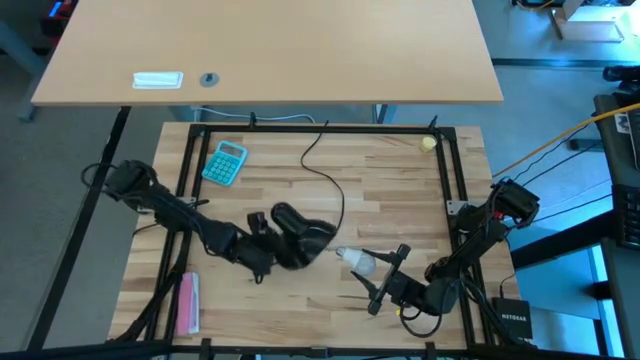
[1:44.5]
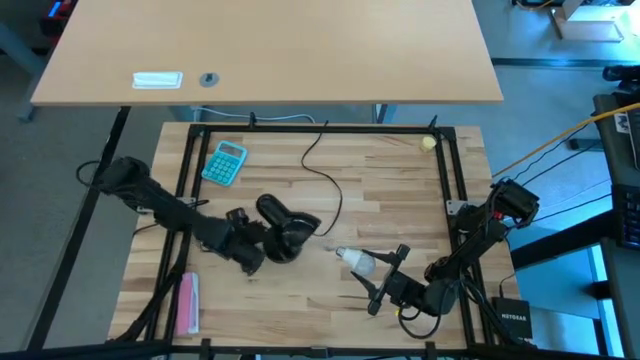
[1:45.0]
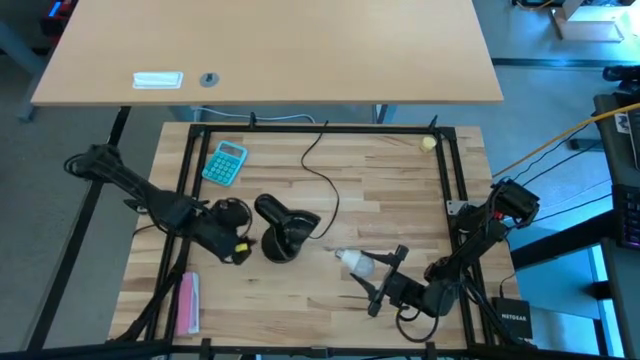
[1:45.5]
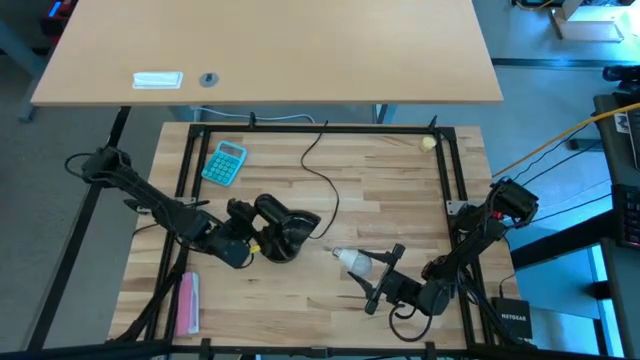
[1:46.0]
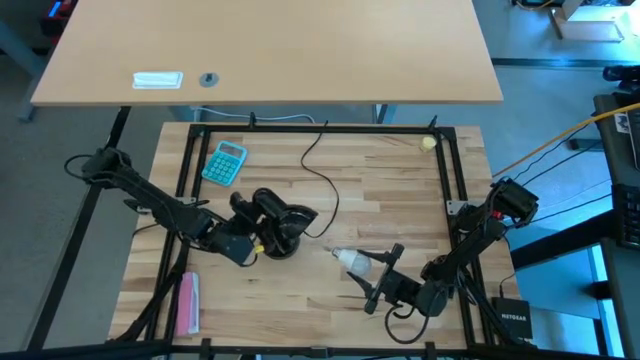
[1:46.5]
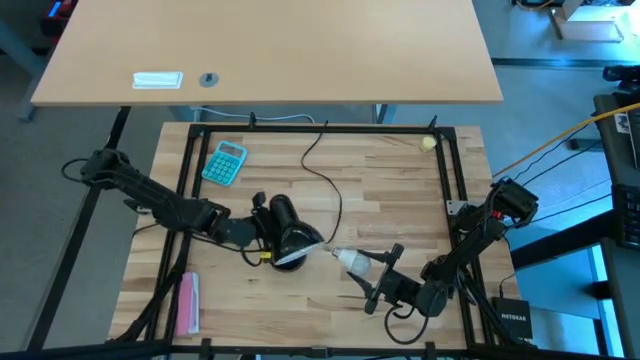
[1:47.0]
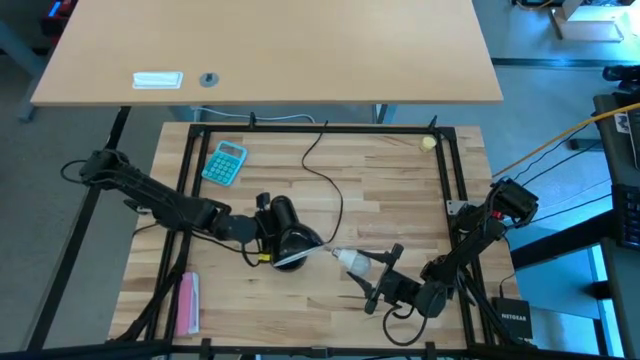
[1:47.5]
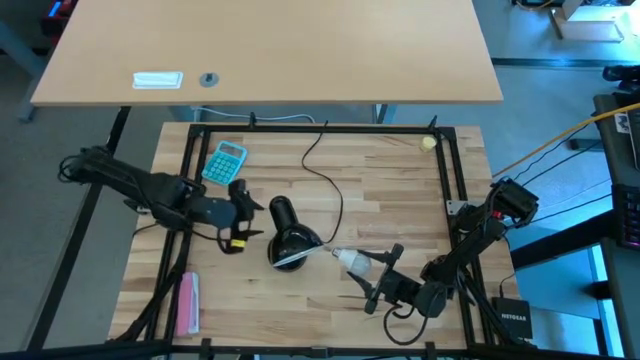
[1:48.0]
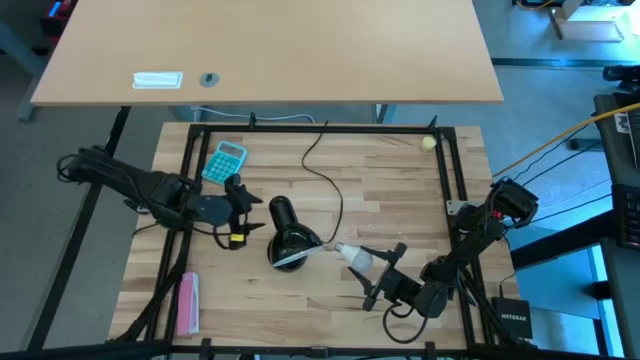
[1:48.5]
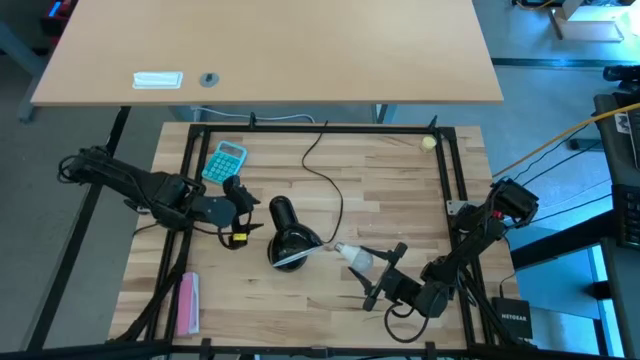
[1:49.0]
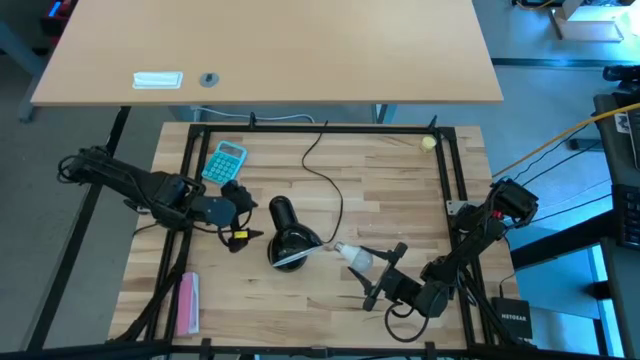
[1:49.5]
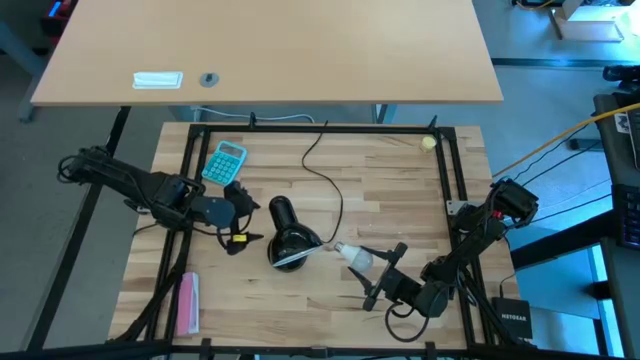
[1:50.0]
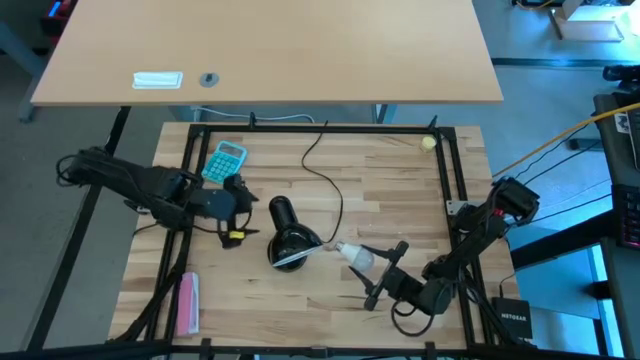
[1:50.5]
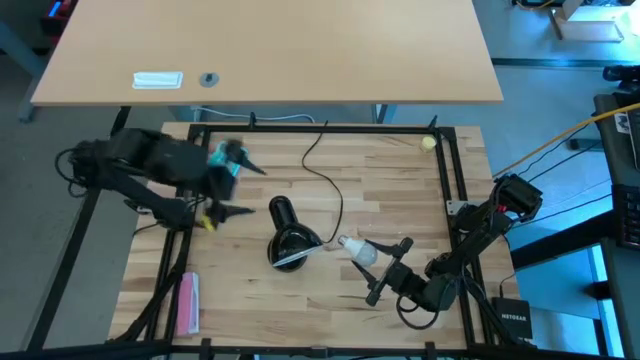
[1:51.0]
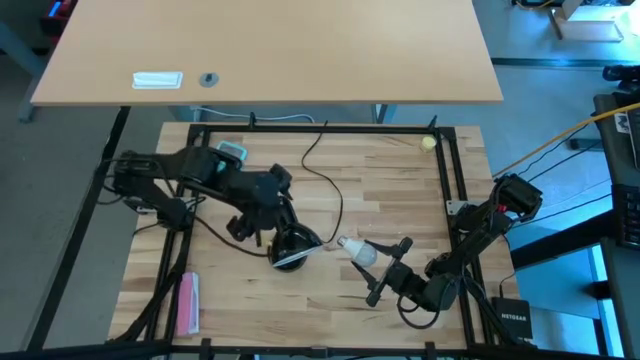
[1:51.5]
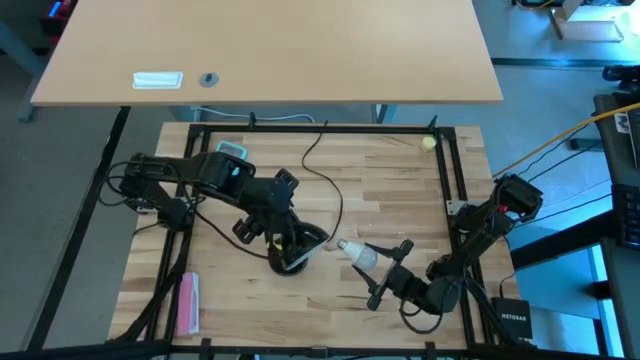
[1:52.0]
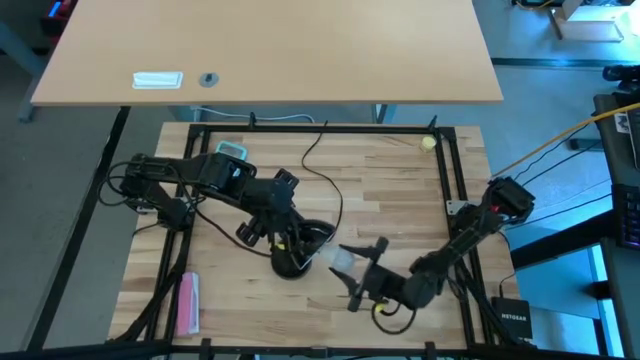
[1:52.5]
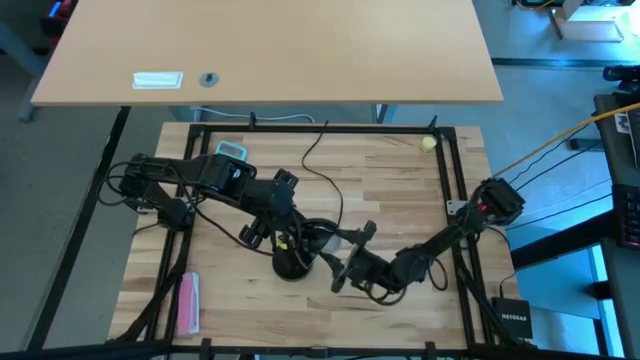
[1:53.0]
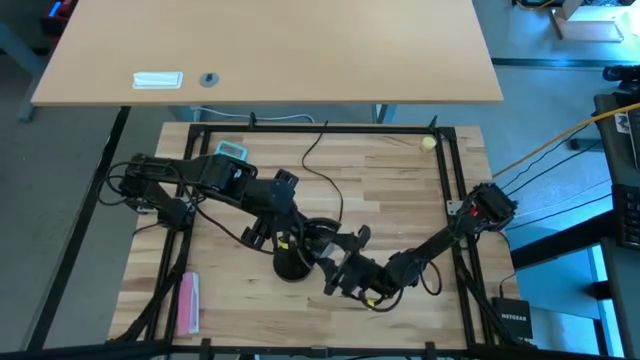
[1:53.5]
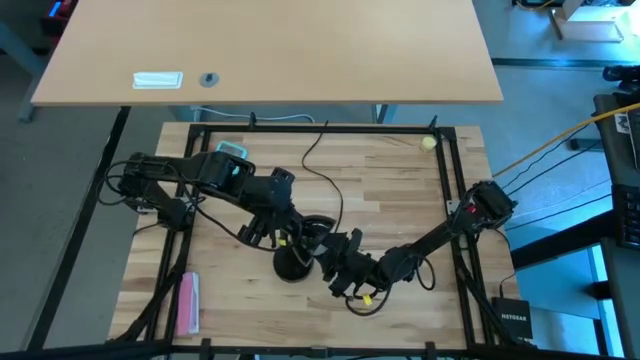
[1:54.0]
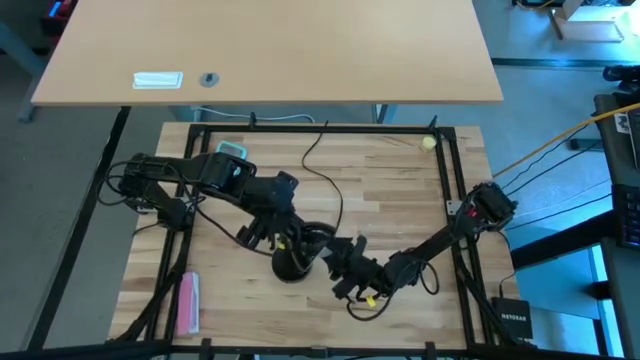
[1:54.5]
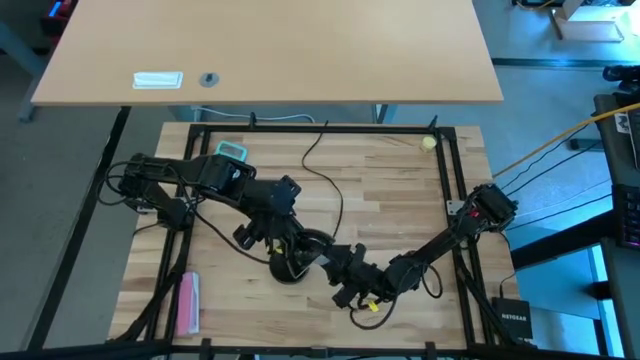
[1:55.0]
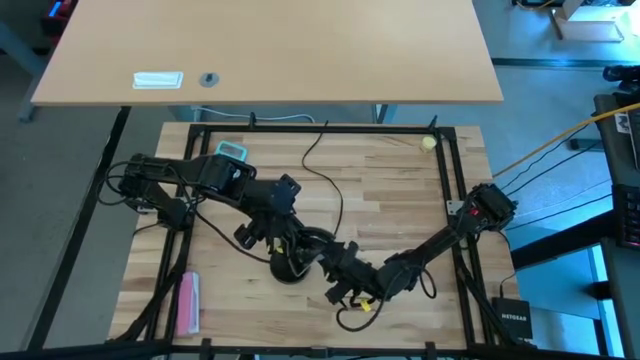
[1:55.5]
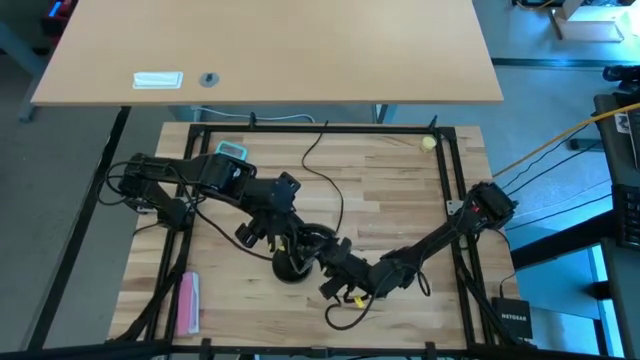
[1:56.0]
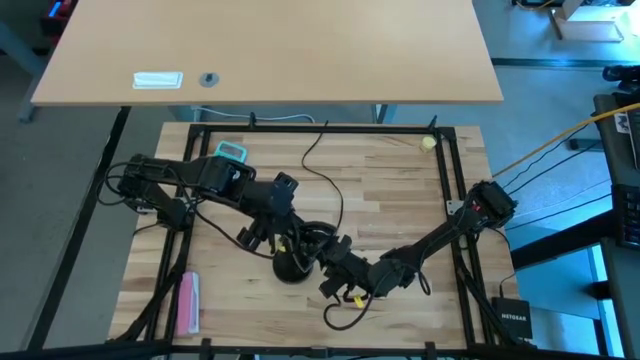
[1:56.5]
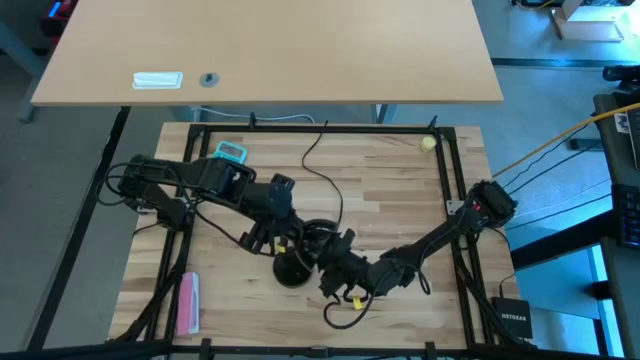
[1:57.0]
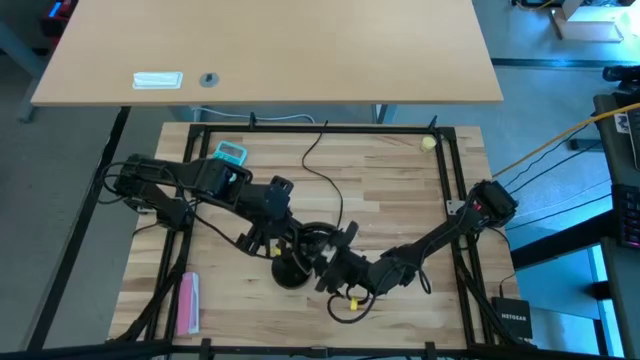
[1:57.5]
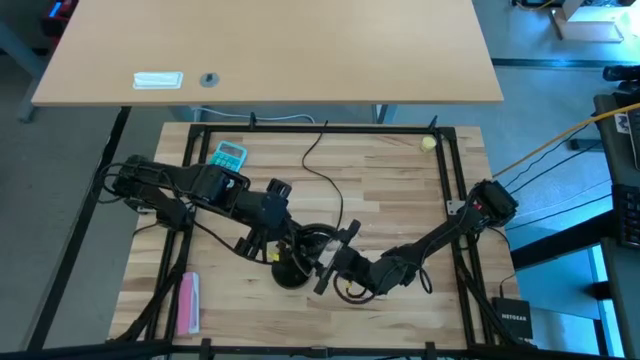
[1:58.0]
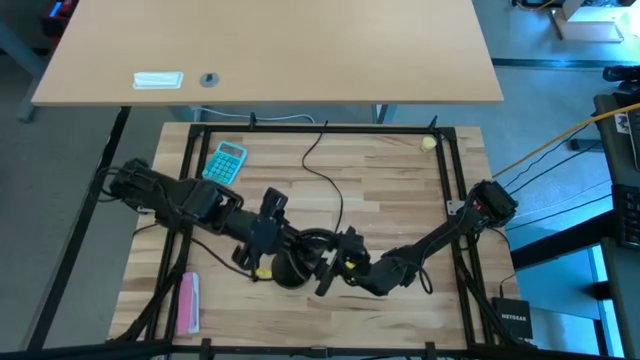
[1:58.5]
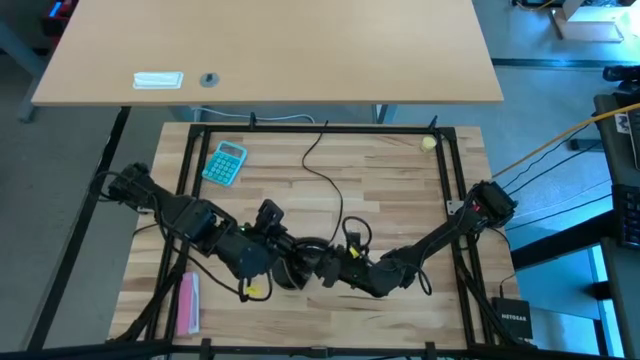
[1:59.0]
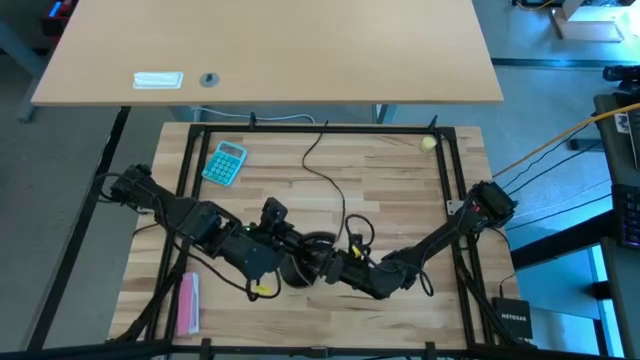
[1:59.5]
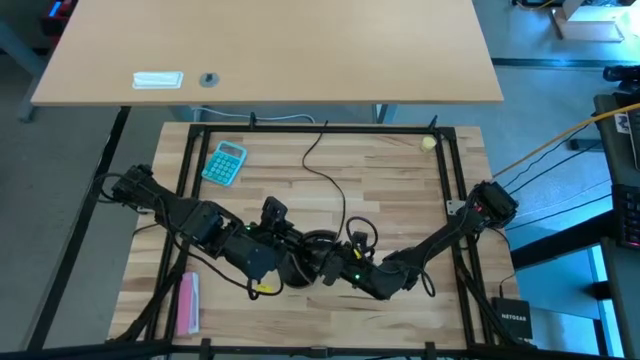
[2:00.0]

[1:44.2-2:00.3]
Task: Screw lightbulb
Insert the lightbulb into the black lamp

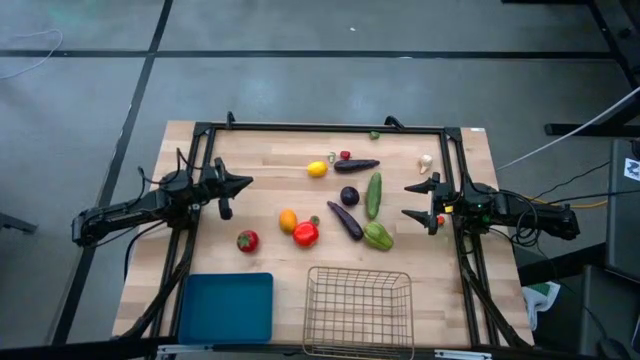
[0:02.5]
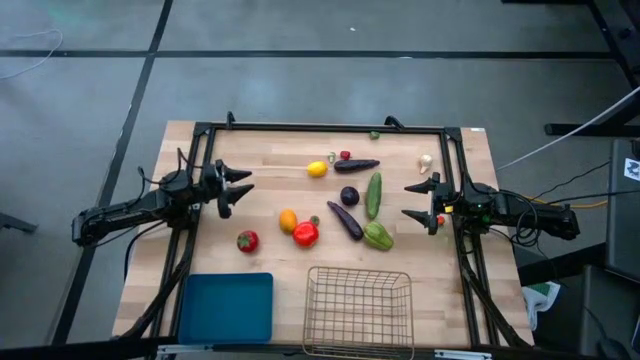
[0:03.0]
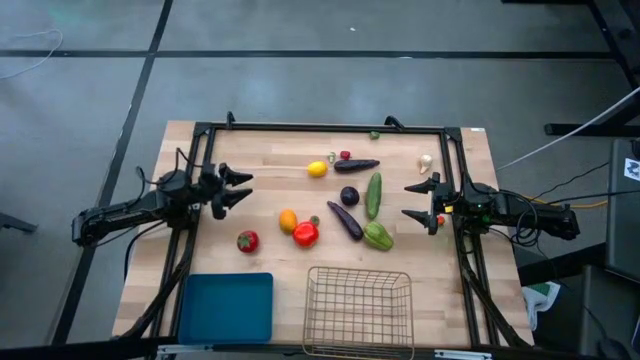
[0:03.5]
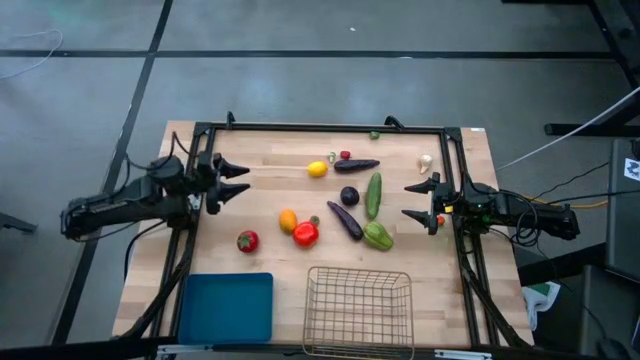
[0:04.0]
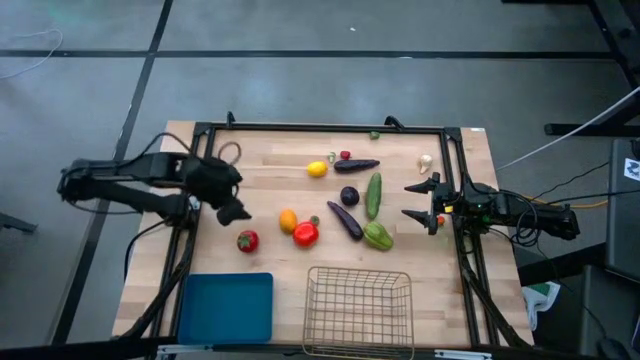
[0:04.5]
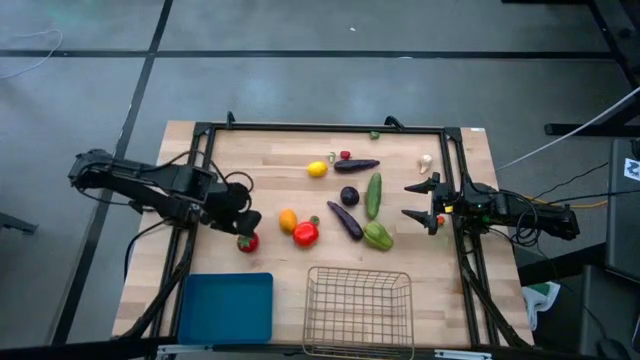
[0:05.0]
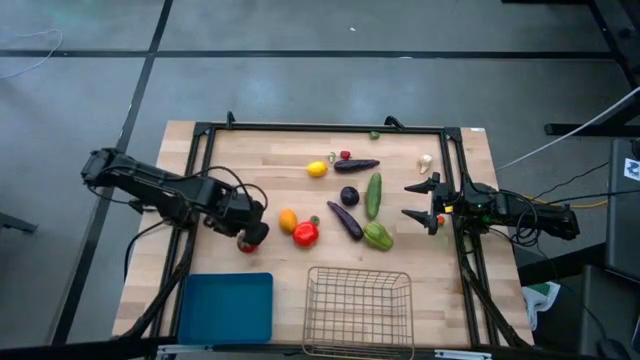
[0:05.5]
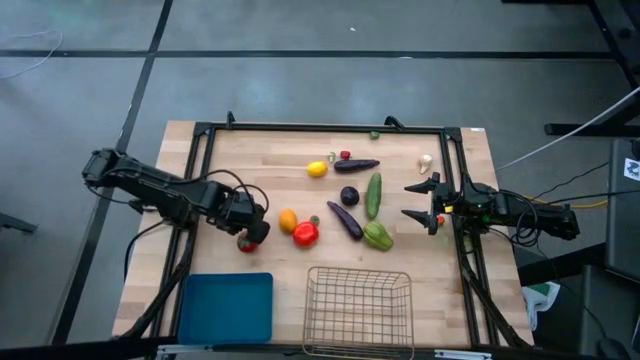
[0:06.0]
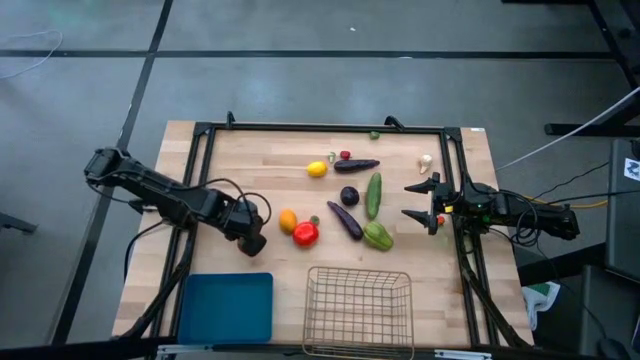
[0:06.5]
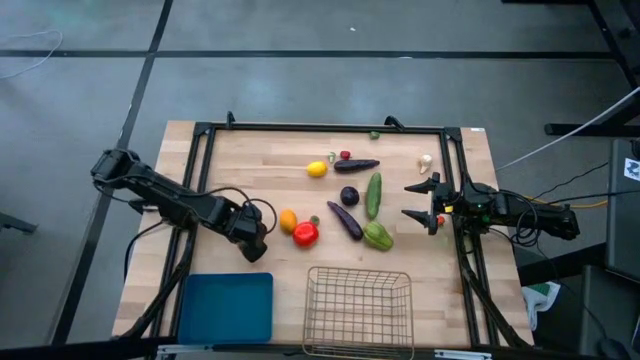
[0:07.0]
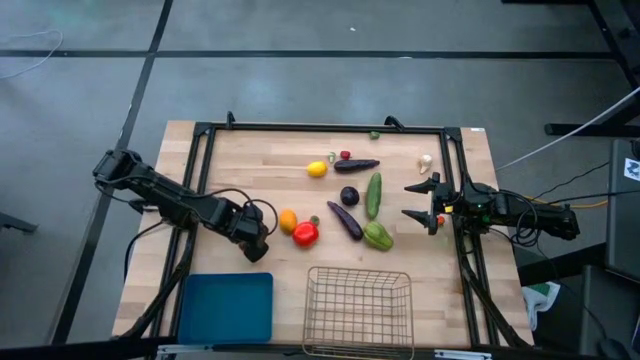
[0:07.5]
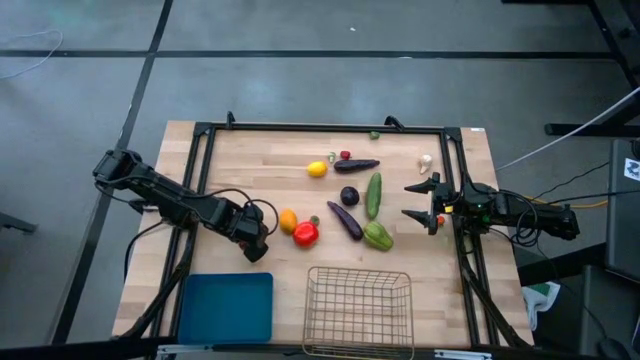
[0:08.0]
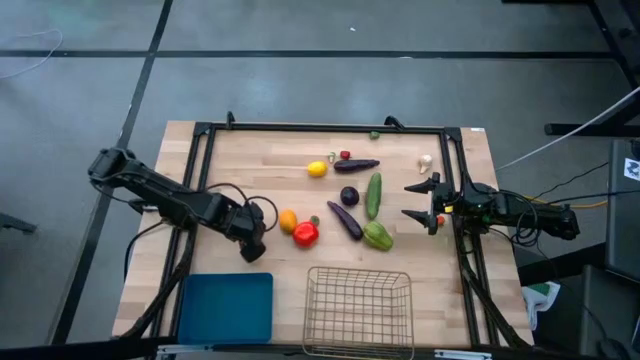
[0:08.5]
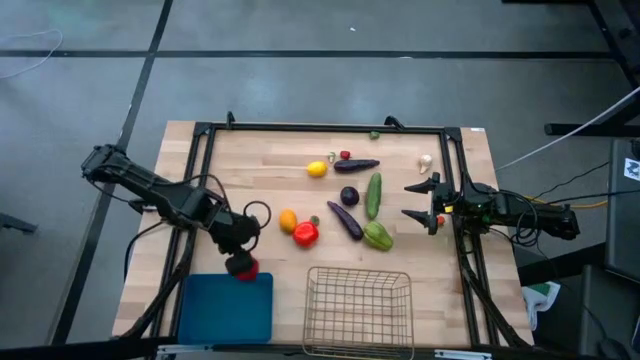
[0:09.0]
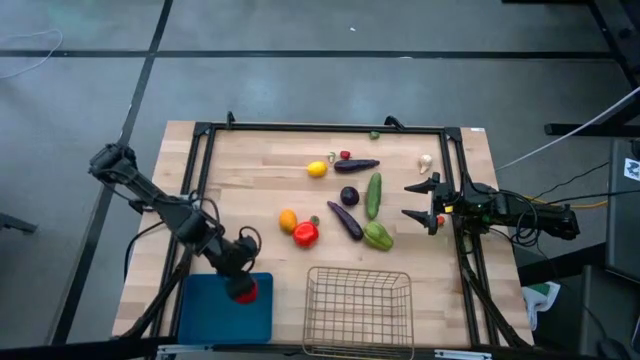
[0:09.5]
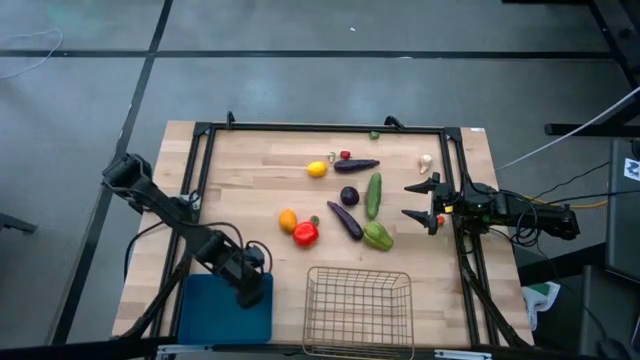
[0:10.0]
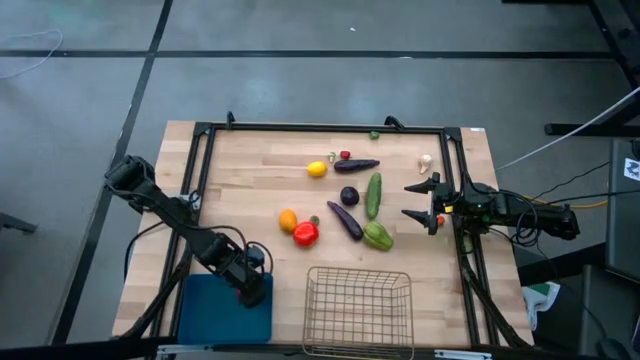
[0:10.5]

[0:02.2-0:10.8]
Task: Sort produce into baskets
Put the tomato into the blue bin
